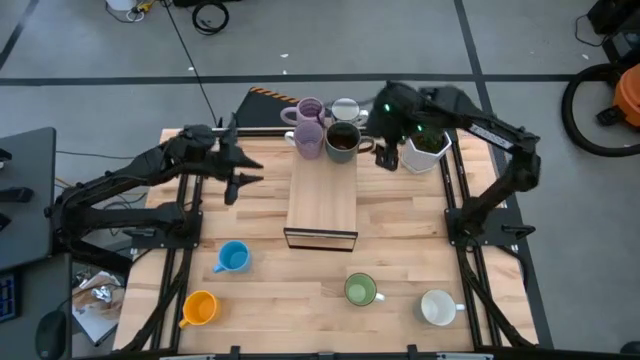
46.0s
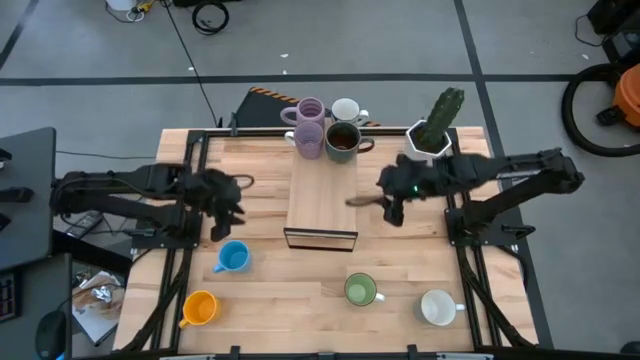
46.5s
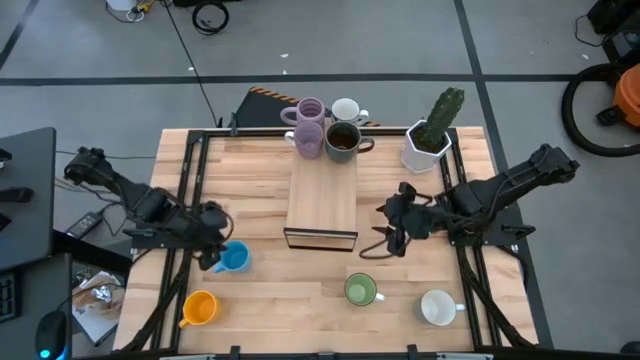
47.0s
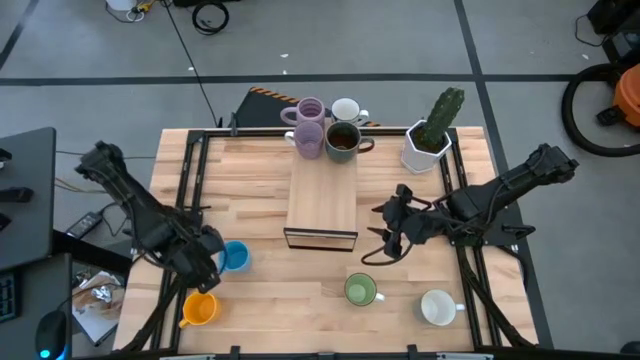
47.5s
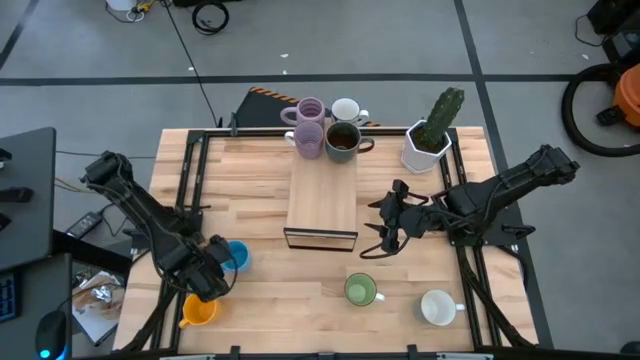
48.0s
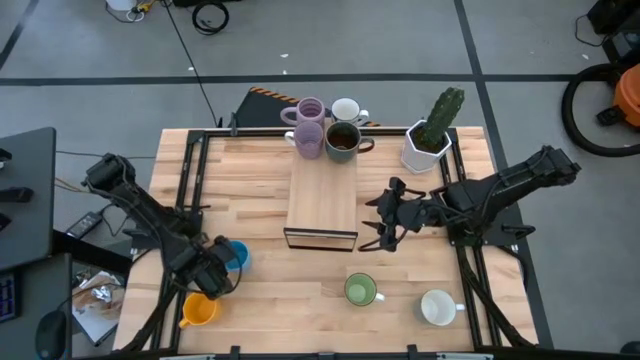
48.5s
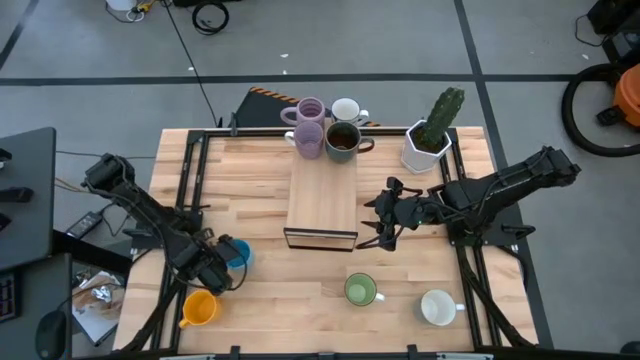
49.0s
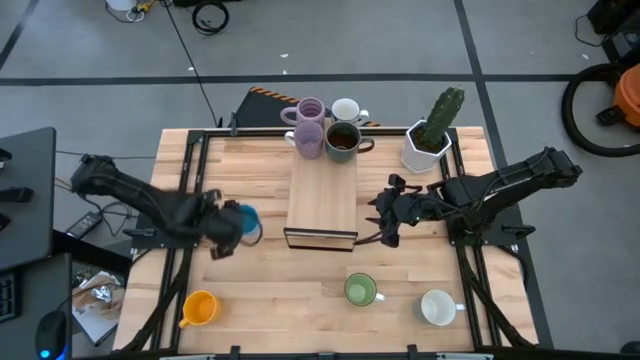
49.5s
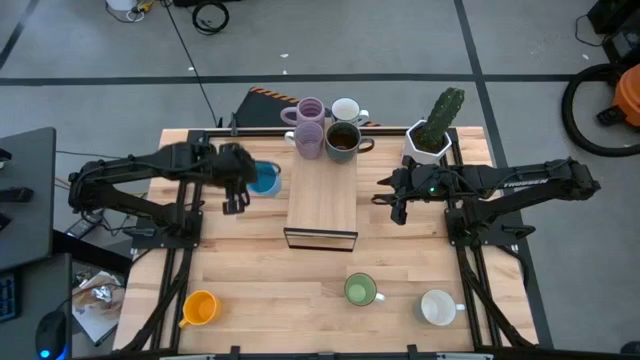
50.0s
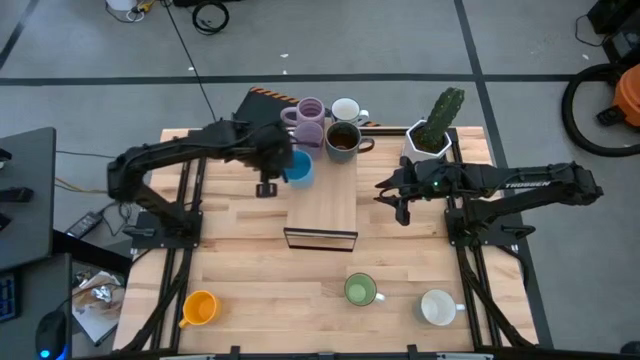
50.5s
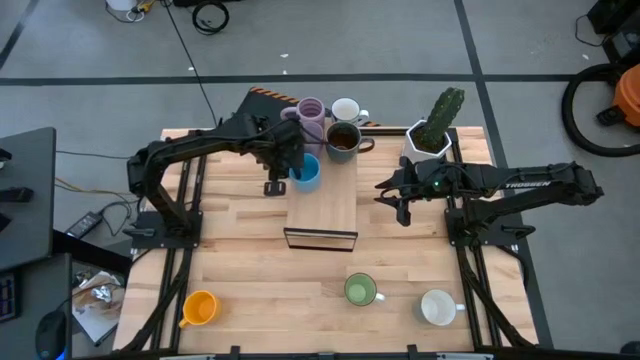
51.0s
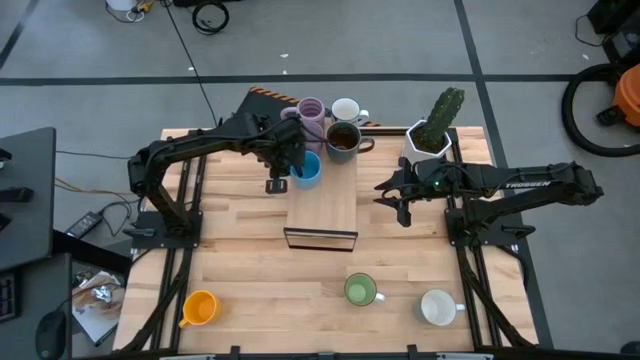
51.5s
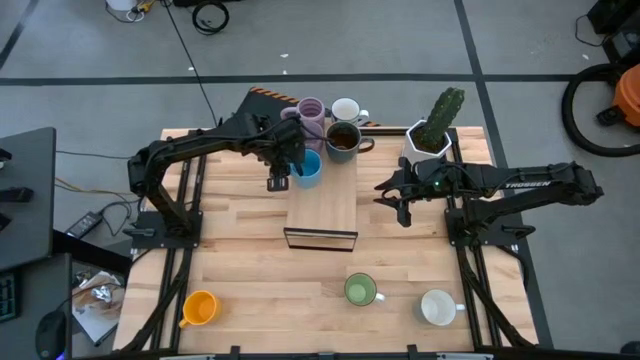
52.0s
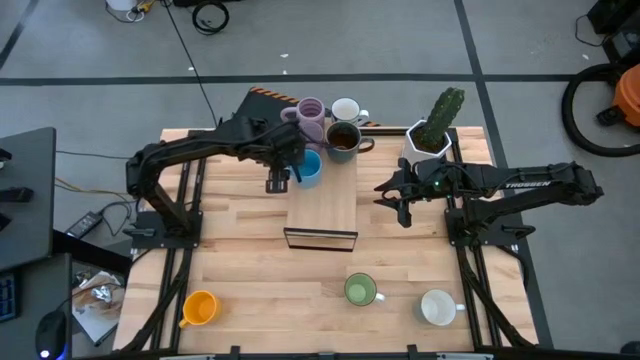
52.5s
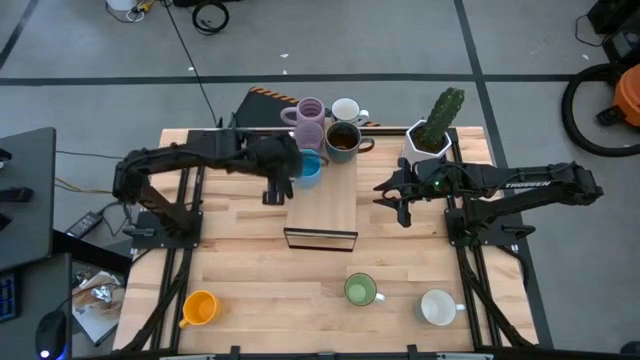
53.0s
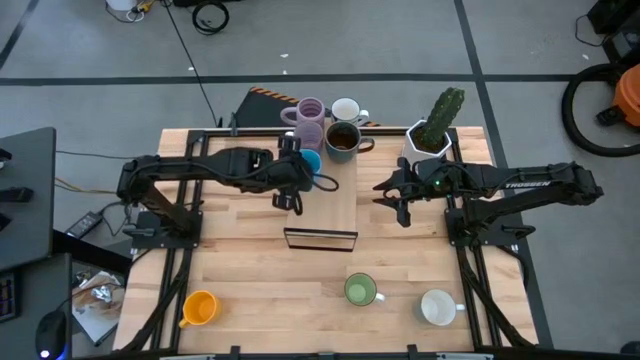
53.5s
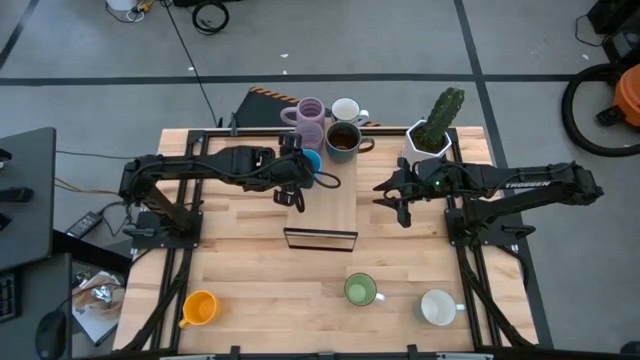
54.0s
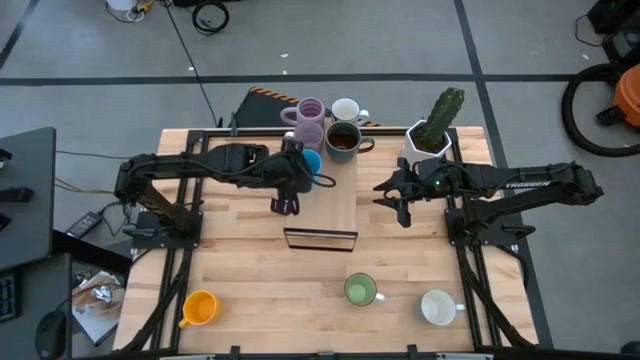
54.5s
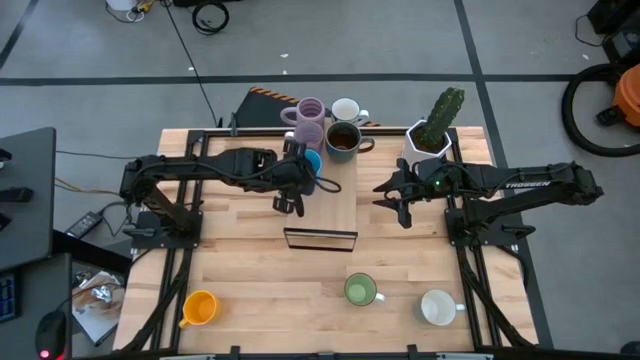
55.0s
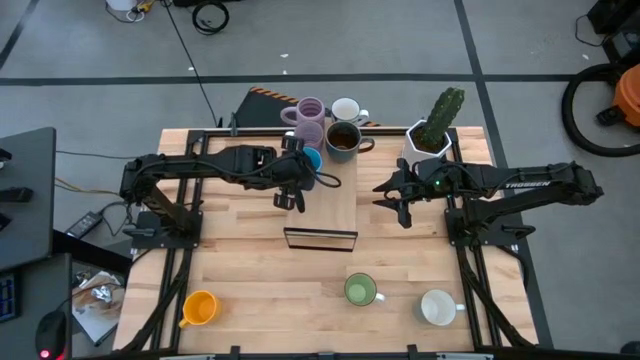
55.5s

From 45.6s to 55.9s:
Task: Place coffee mugs
Put the blue mug on the shelf

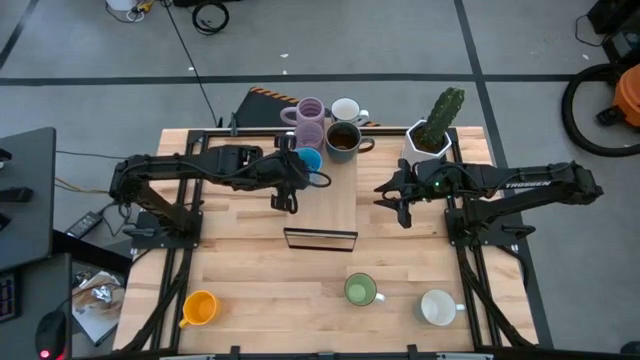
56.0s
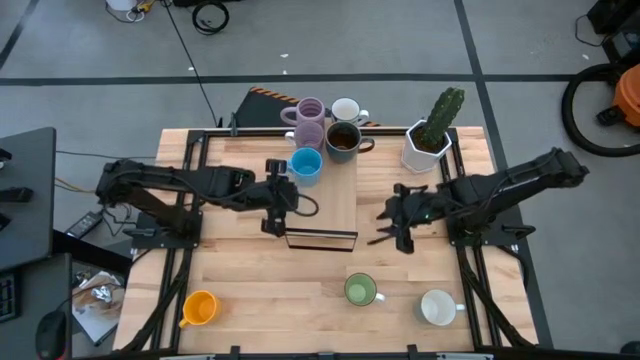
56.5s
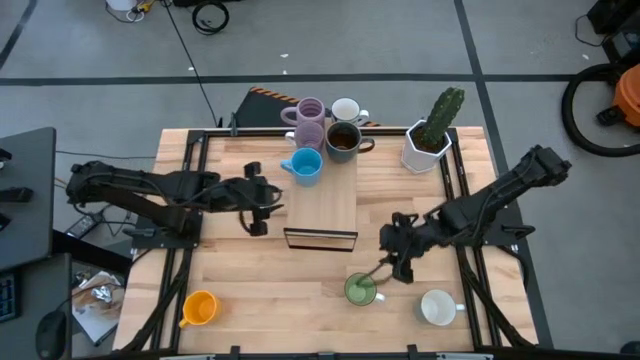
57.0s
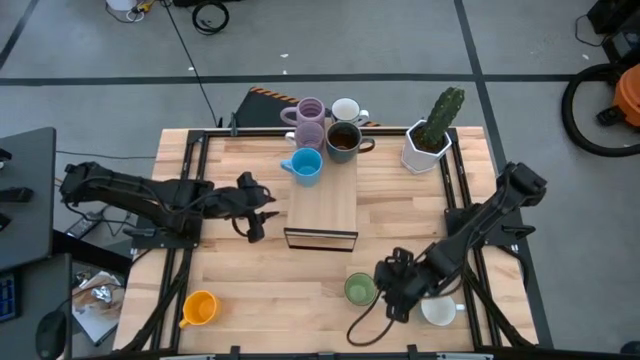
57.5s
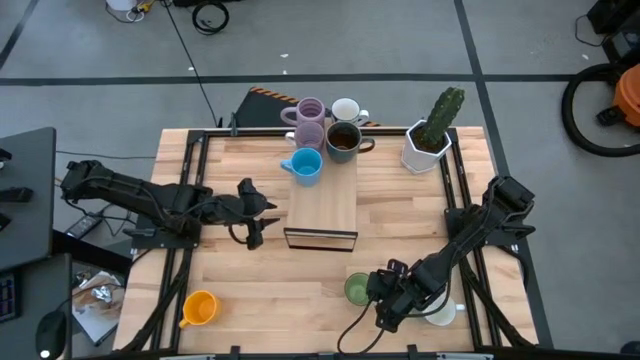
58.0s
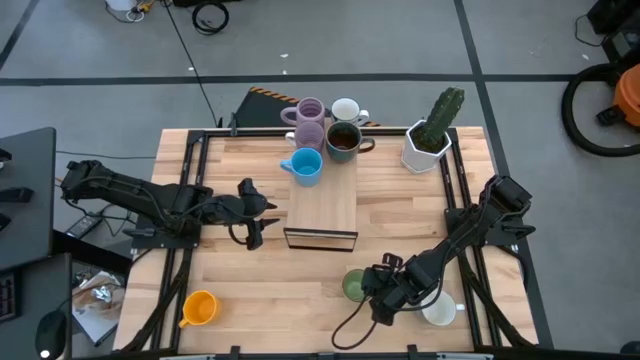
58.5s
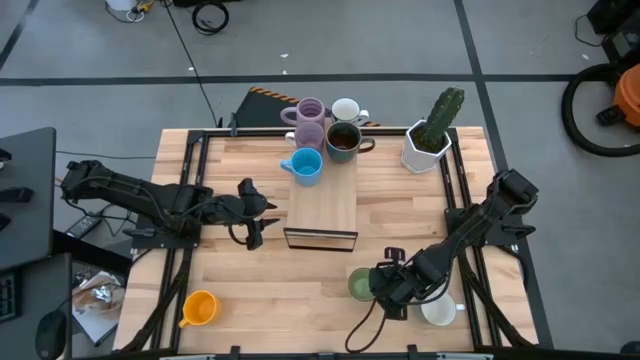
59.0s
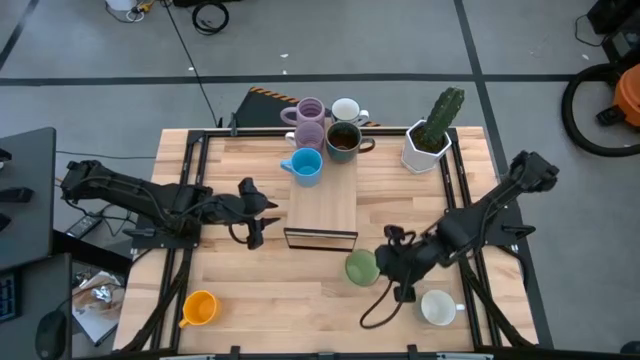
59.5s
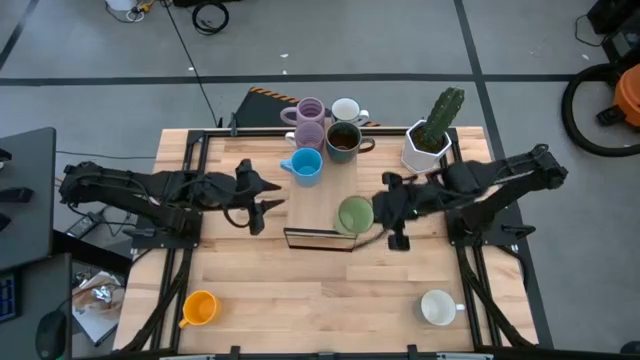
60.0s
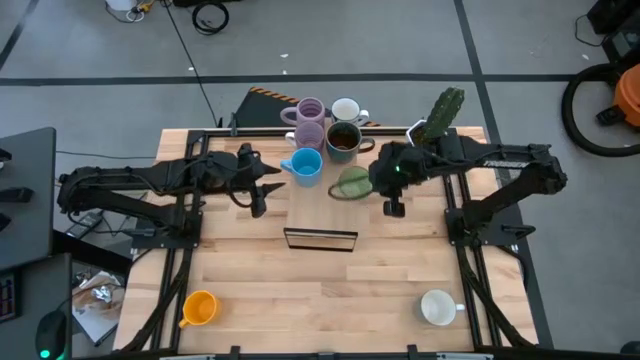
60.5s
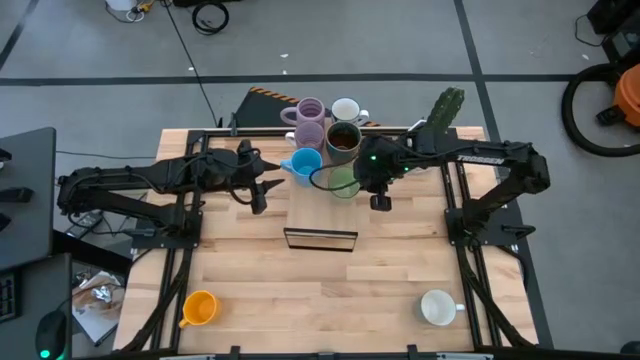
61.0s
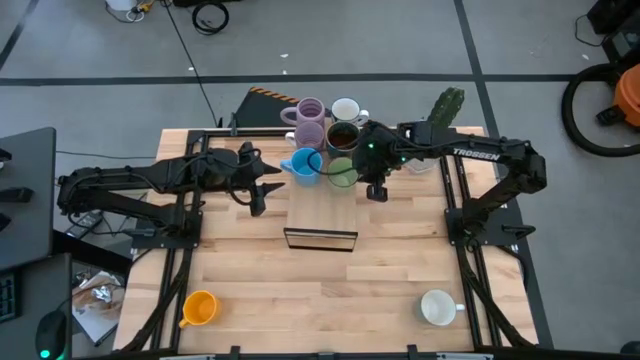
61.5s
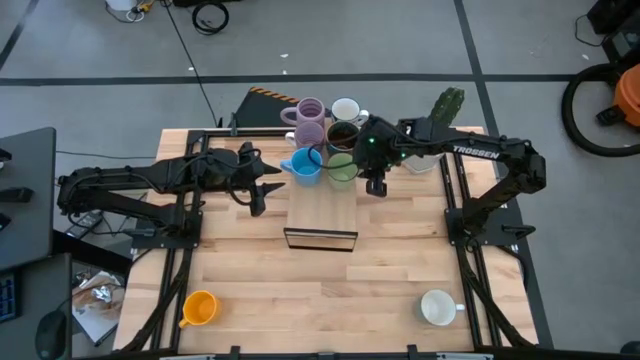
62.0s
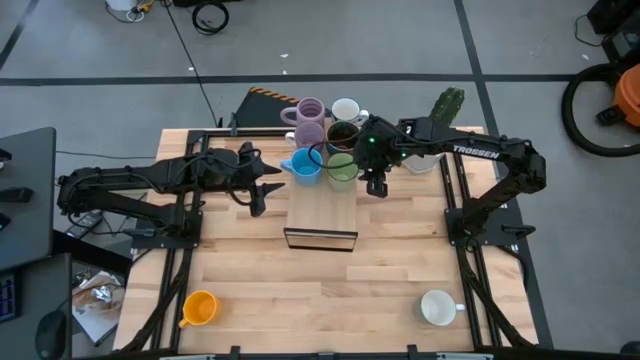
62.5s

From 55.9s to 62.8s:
Put the green mug on the shelf

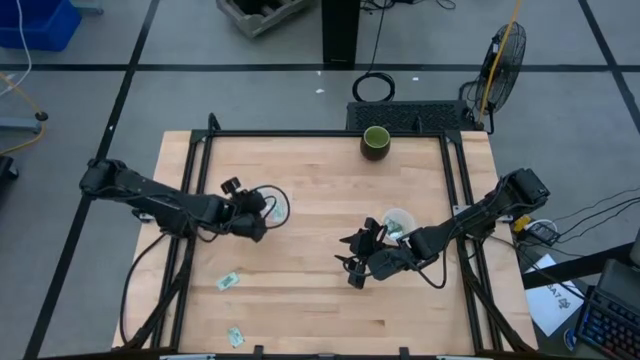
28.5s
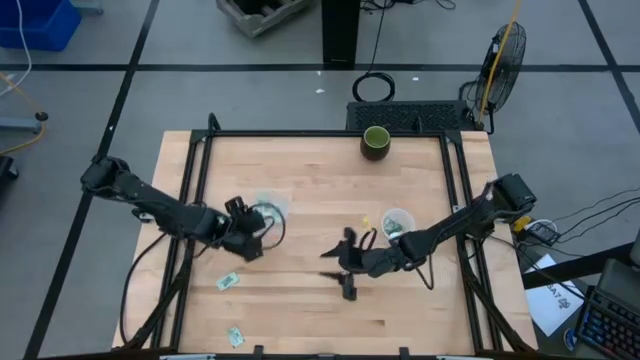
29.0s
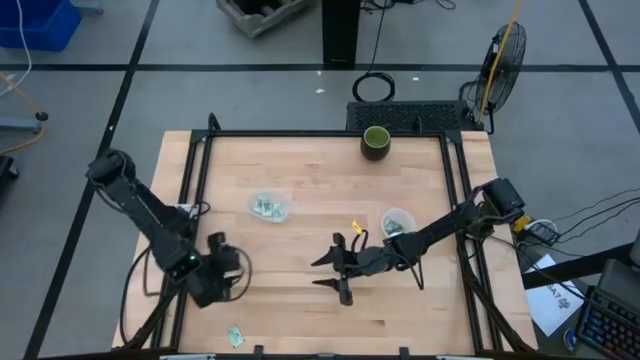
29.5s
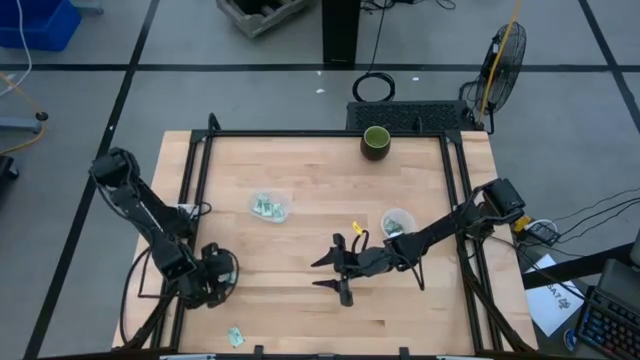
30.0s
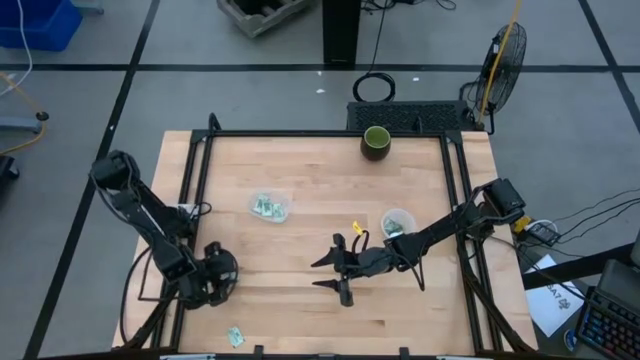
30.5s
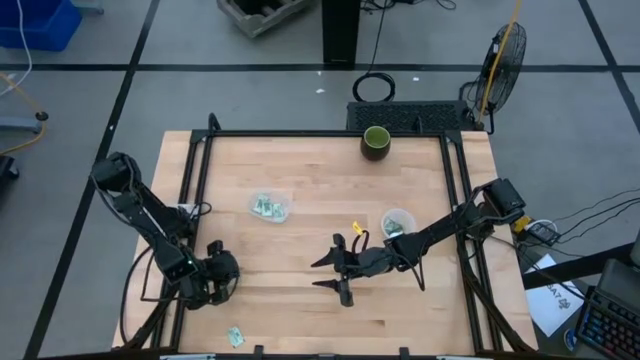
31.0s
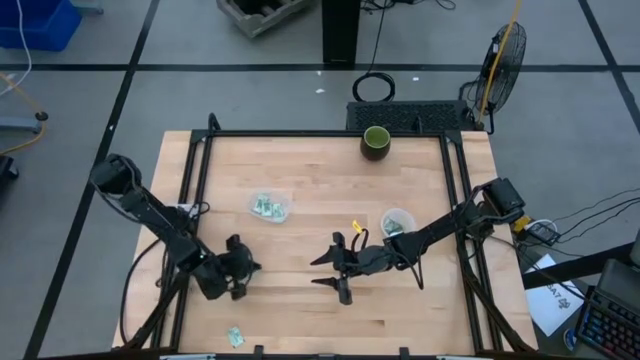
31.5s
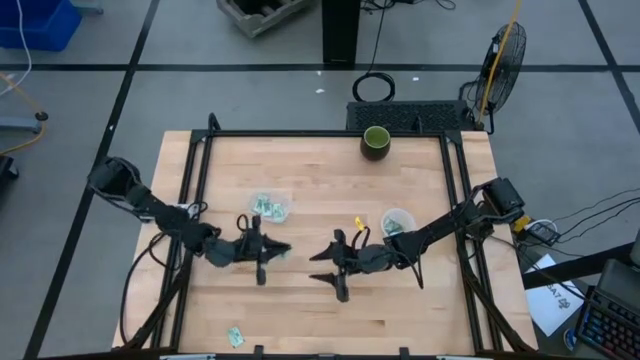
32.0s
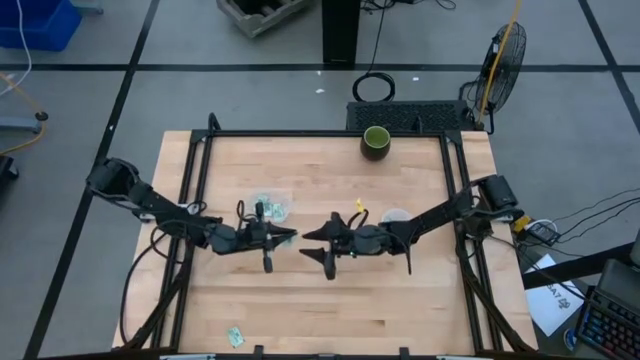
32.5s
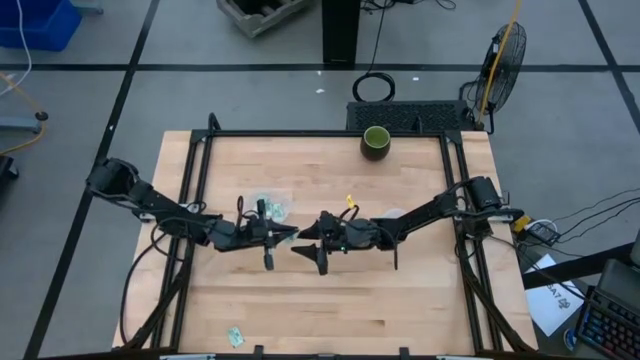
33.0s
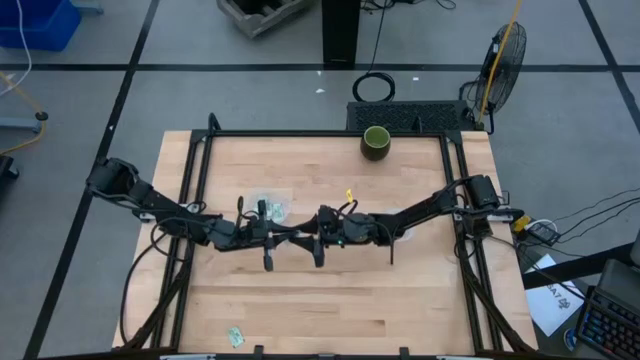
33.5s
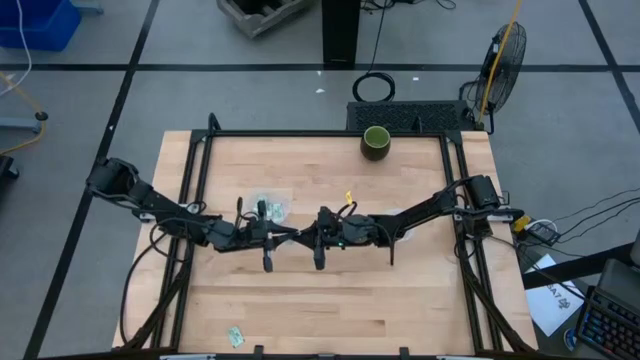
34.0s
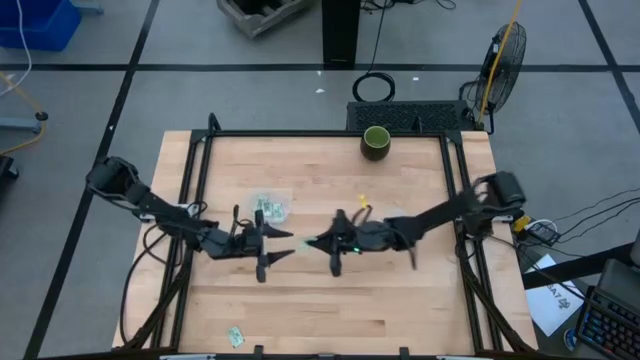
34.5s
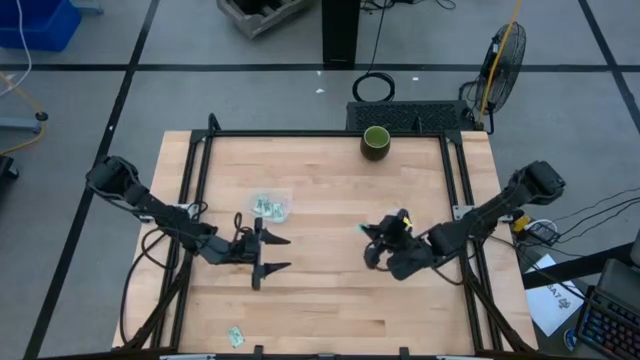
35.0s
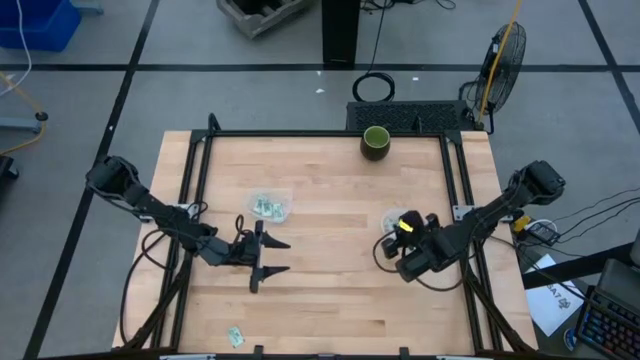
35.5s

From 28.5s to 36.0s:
Task: Pick and place Stevia / Truvia into bins
Put the white stevia packet into the transparent circular container
